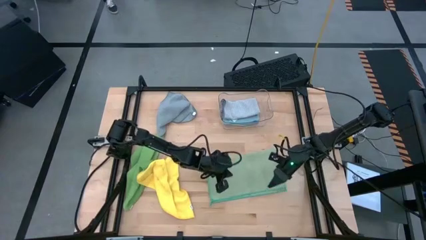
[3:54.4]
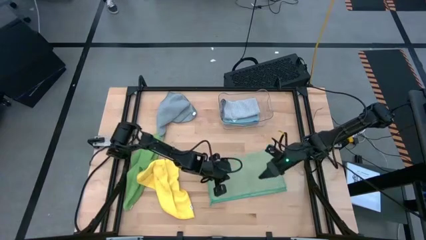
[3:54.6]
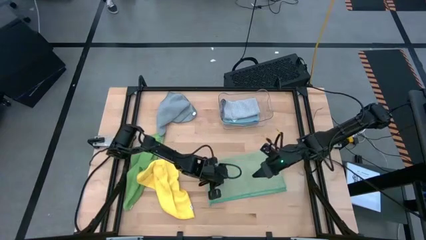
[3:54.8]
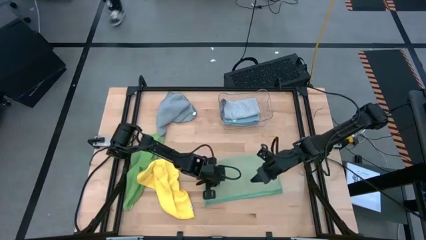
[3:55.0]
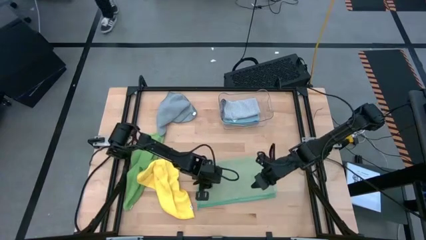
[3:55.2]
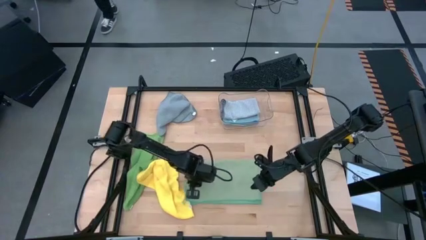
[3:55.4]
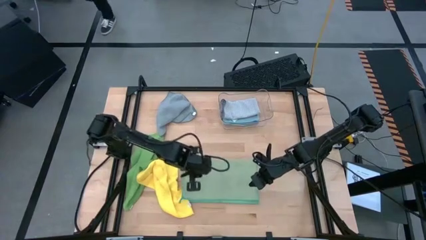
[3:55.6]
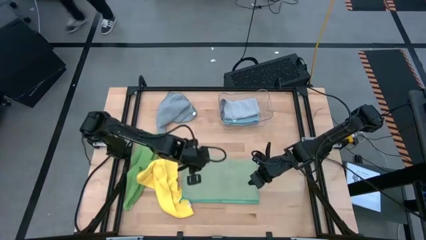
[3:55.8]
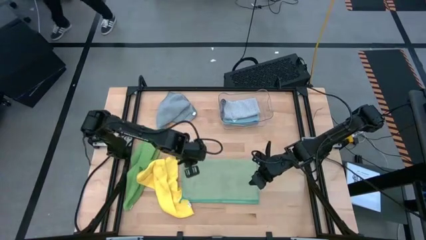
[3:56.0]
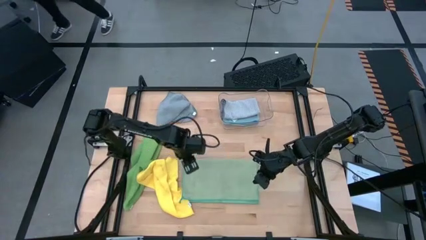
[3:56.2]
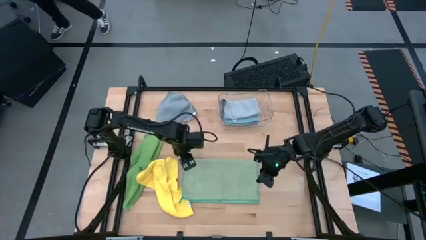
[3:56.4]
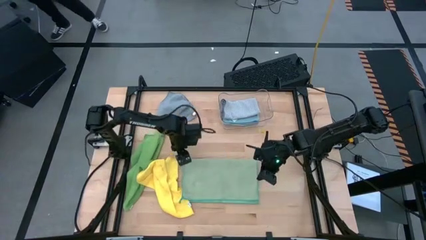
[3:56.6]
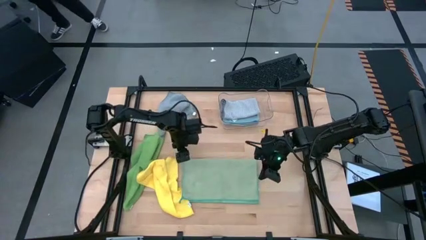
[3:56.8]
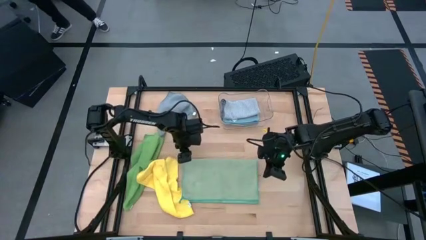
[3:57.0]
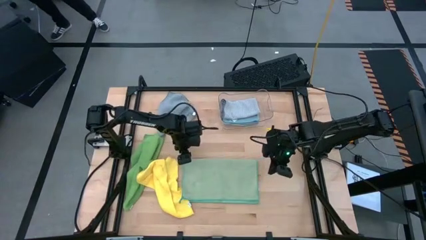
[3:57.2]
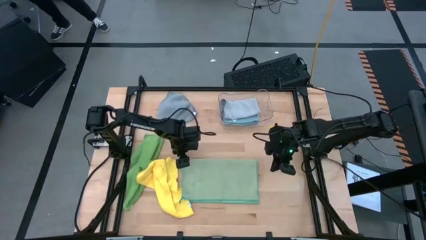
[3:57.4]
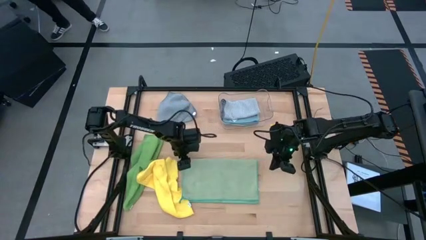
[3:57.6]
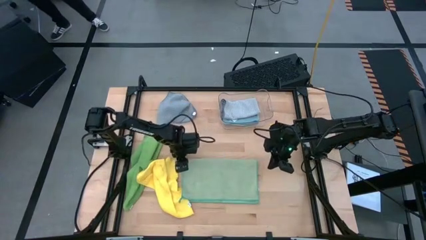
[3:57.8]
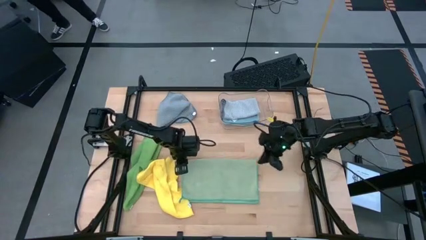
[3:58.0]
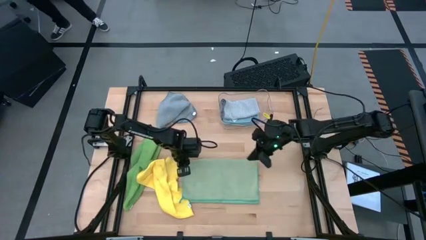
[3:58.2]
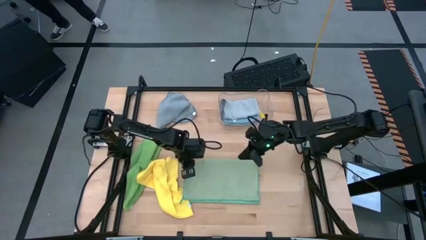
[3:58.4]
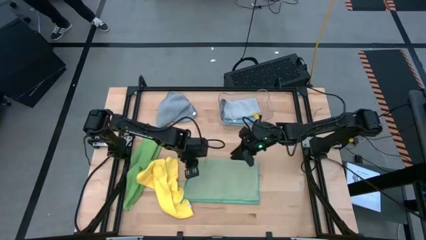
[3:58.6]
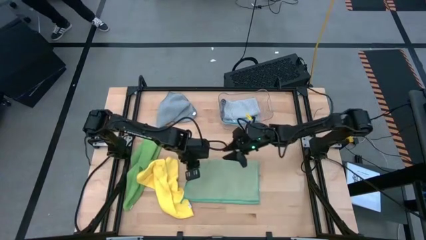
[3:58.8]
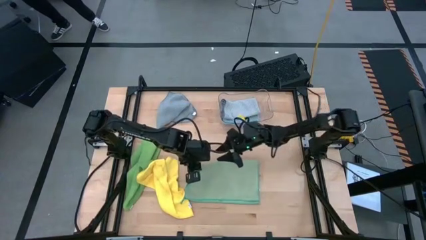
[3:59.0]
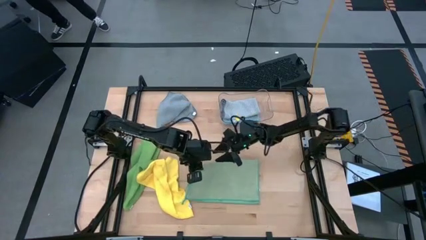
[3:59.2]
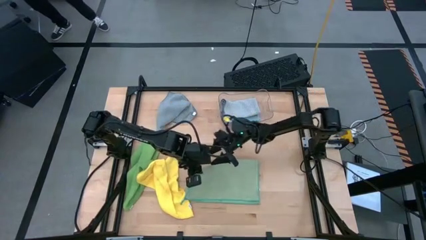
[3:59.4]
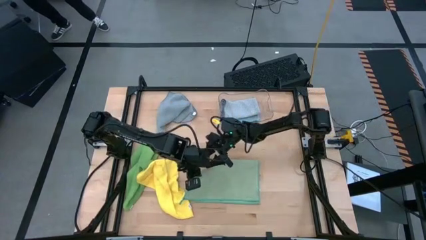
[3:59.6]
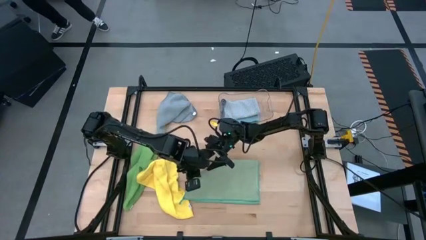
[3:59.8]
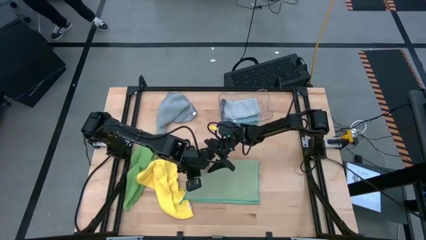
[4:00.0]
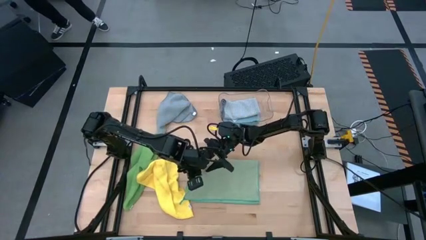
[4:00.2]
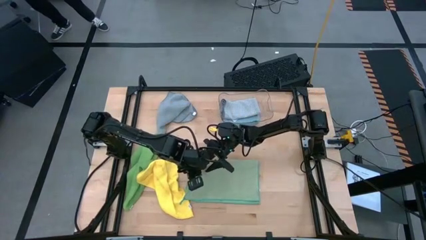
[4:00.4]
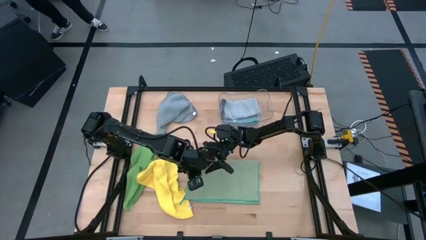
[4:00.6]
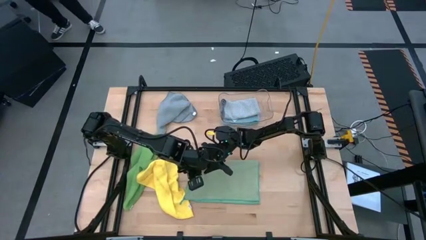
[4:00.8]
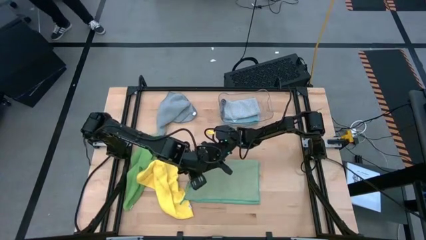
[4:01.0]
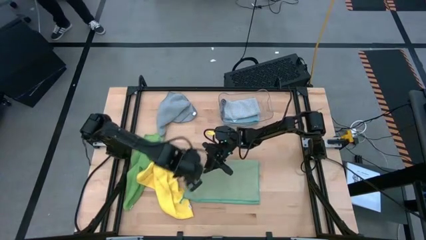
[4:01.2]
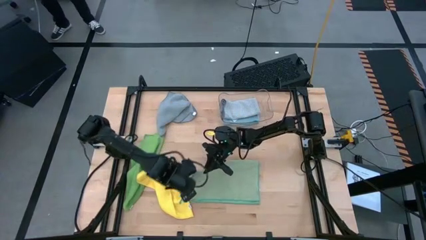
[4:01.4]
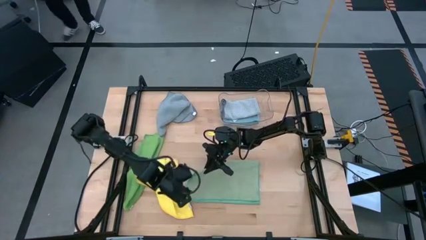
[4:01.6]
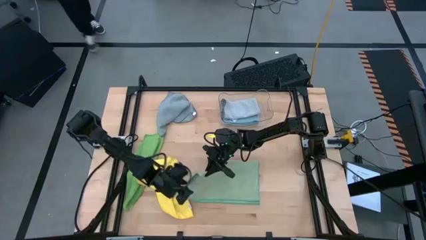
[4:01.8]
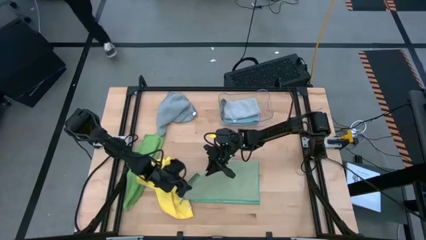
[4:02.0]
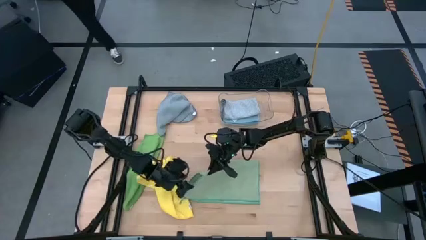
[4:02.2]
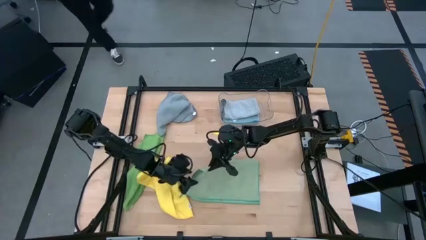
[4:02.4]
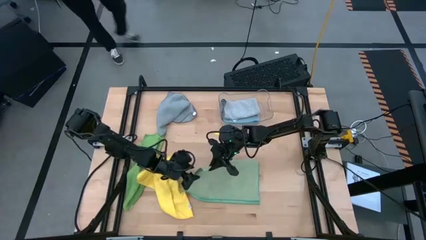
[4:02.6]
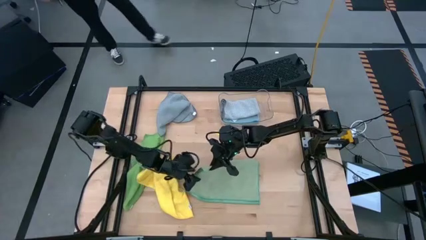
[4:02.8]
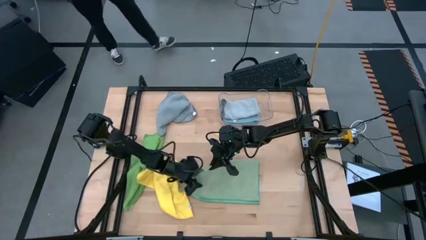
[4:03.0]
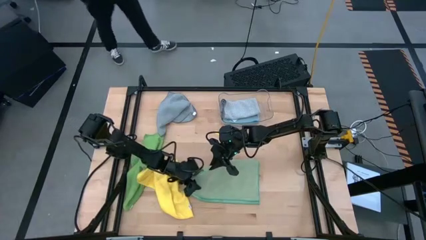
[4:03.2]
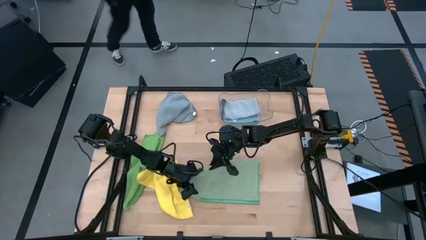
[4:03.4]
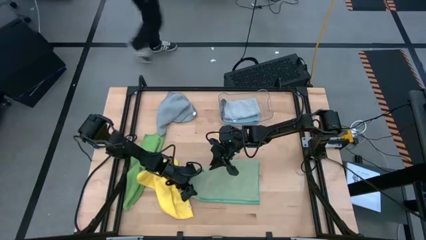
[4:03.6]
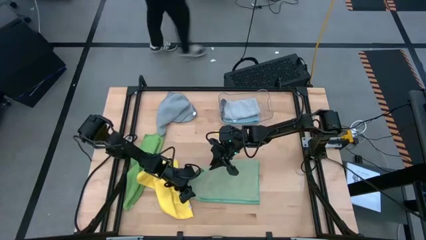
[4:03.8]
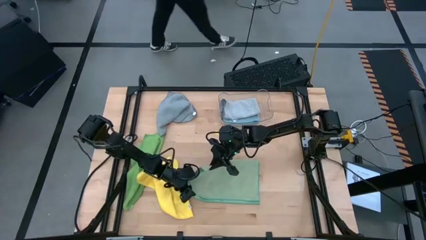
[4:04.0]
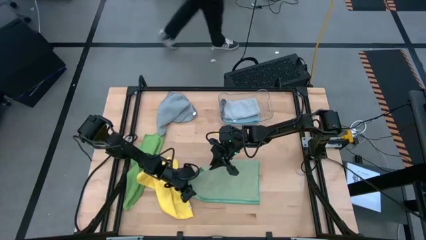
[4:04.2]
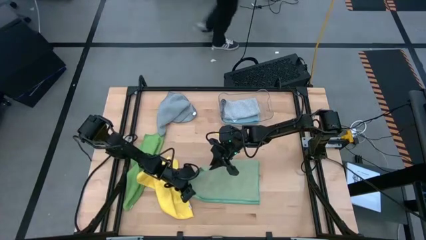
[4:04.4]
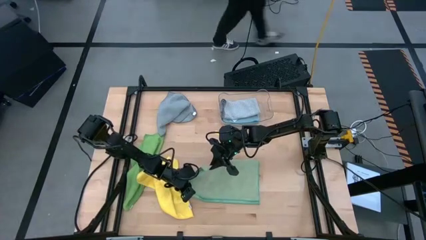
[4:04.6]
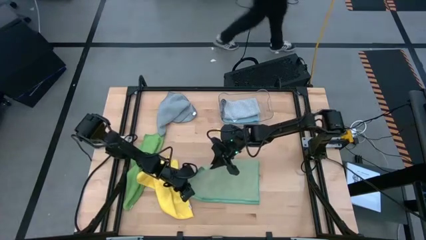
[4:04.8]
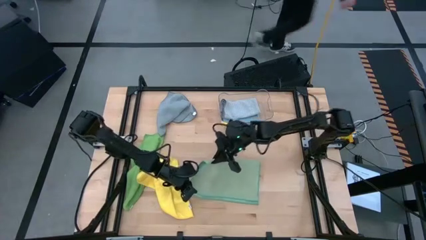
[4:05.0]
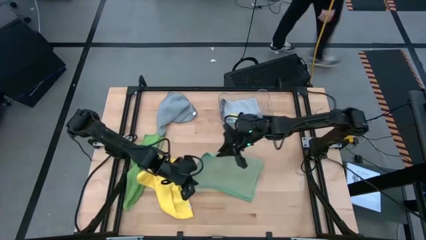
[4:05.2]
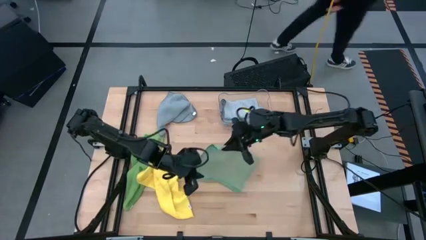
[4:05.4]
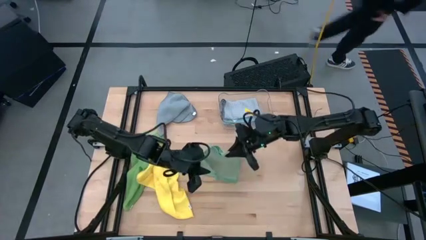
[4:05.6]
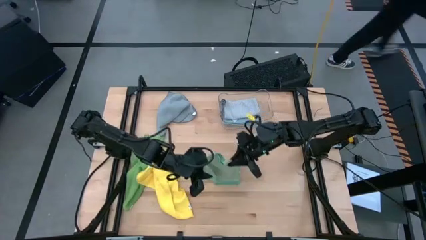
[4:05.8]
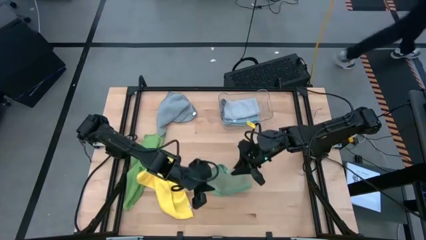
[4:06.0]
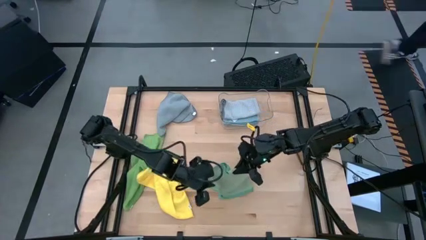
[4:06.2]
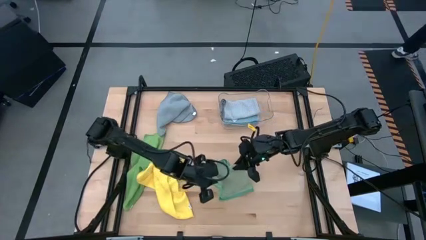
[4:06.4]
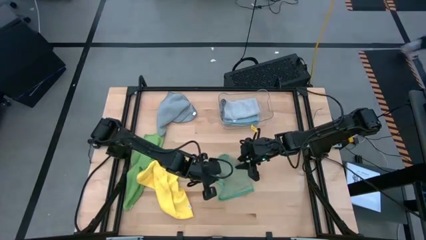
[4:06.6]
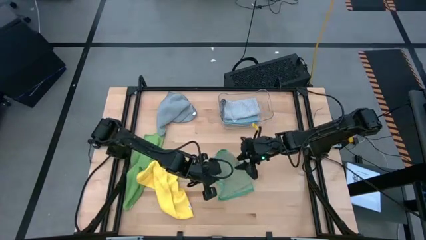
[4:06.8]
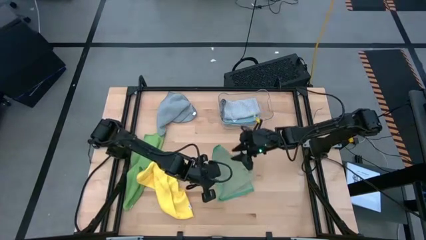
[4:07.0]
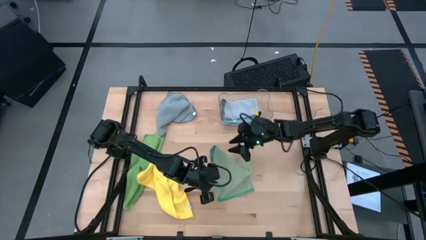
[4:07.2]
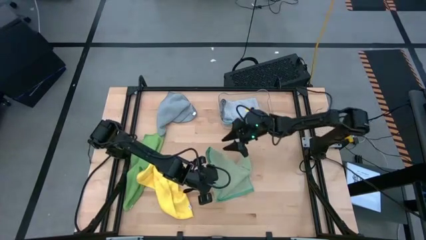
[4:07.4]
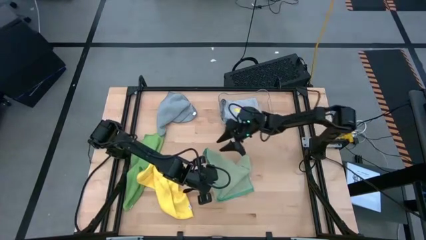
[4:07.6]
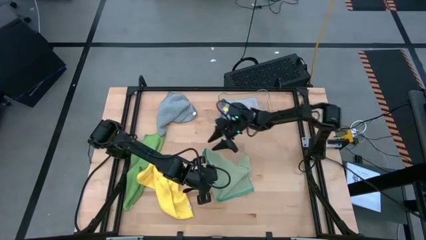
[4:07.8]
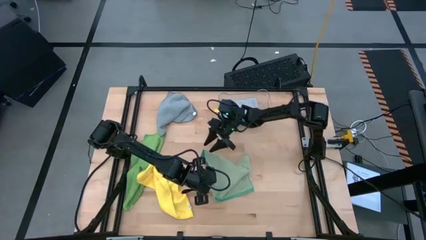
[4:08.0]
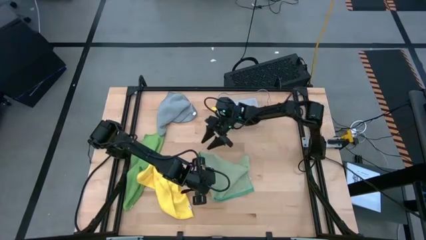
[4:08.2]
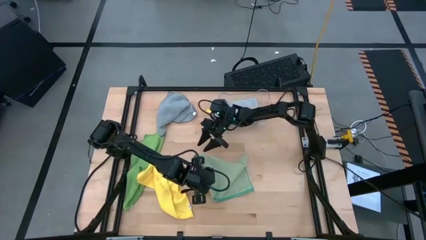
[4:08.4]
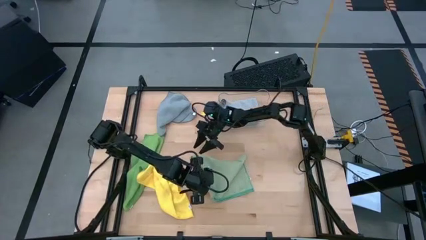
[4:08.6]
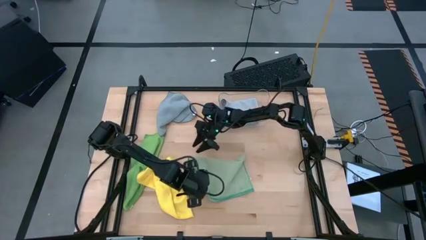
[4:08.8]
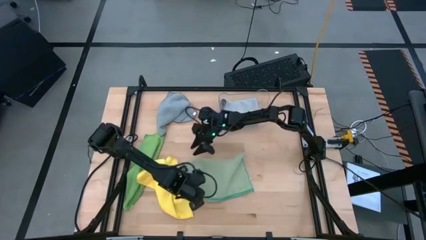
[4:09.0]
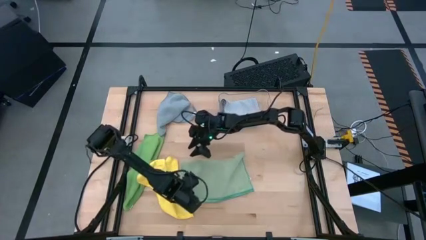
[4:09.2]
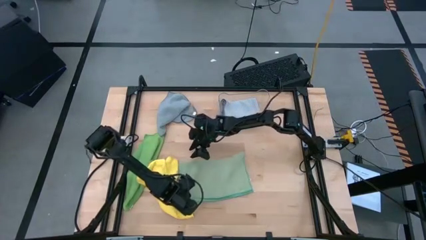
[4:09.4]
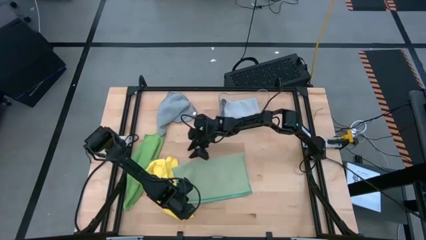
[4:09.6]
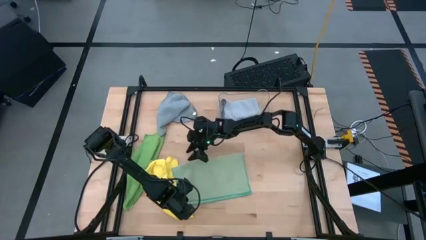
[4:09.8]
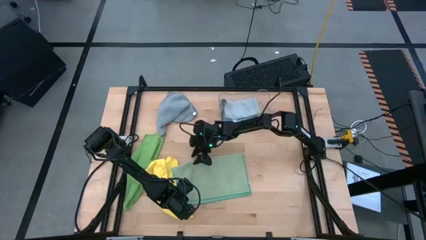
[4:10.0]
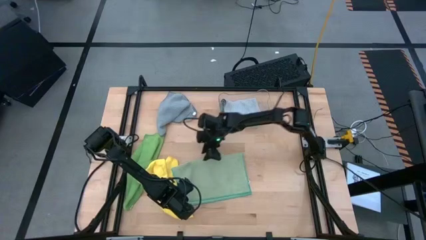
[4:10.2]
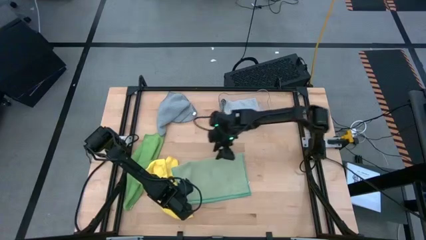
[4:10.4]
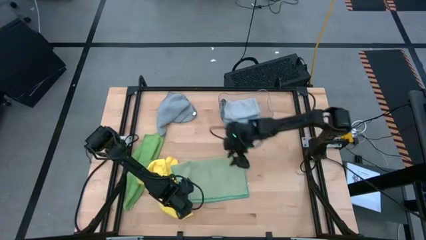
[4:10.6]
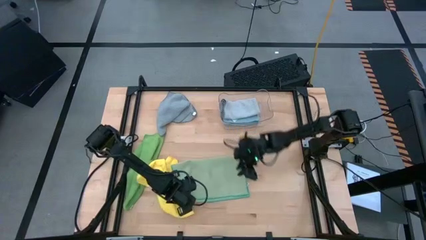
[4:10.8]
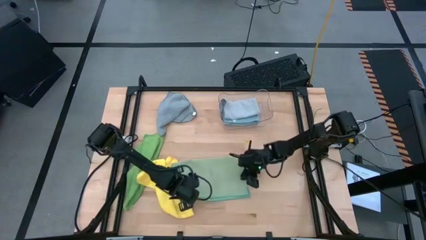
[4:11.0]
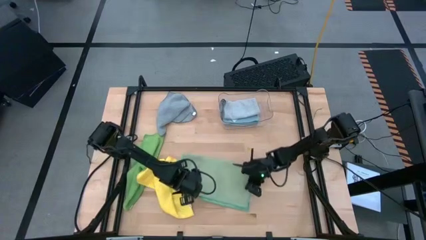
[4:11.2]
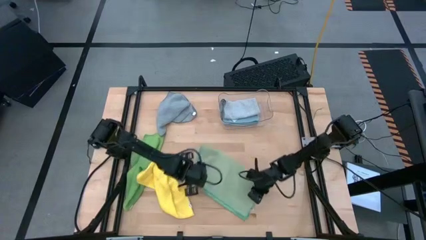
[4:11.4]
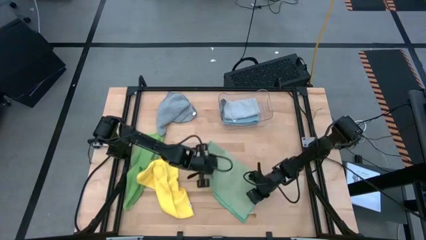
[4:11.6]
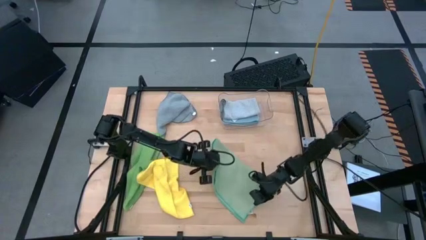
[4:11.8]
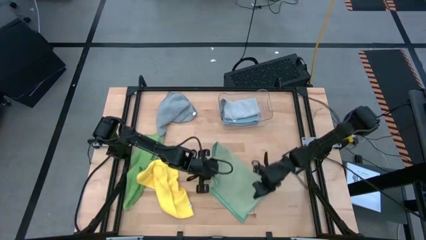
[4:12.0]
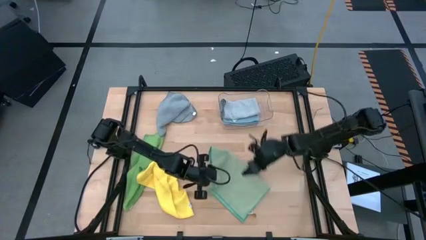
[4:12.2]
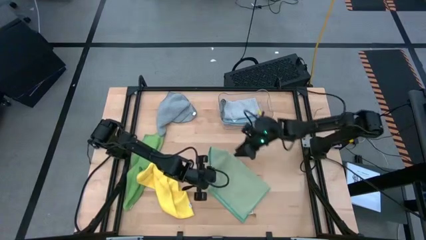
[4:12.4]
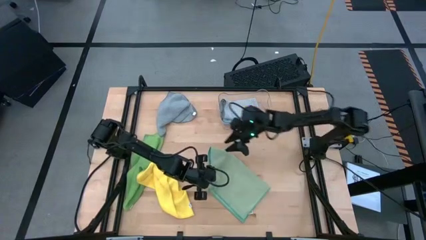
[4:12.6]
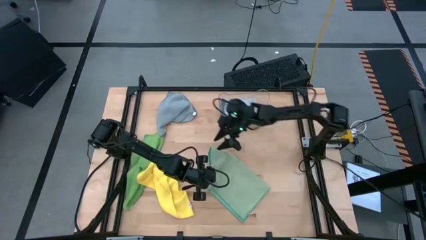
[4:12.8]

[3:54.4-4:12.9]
Task: Fold microfiber towels
Fold the light green towel
